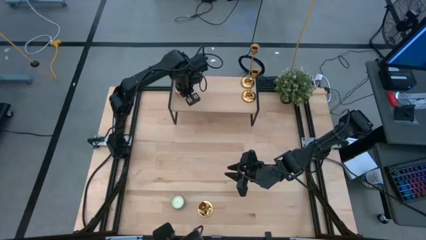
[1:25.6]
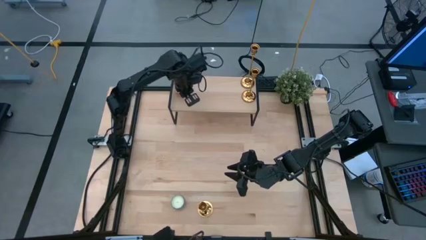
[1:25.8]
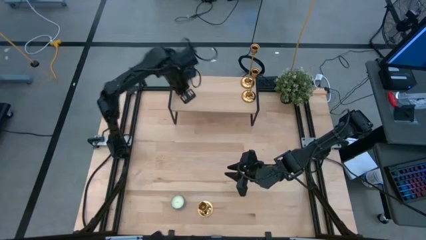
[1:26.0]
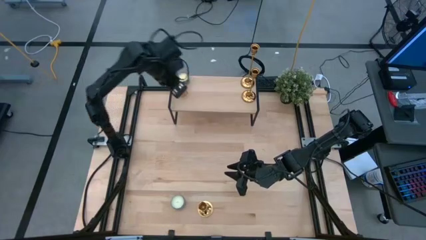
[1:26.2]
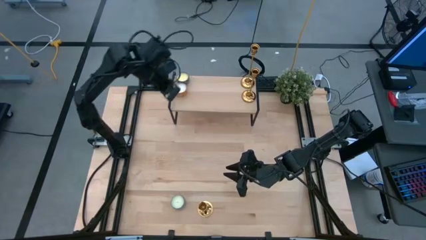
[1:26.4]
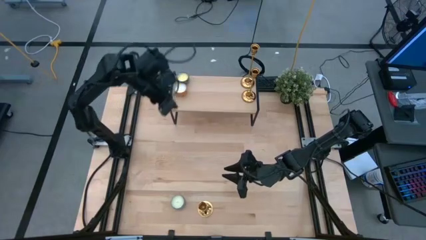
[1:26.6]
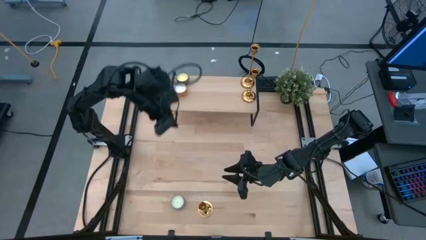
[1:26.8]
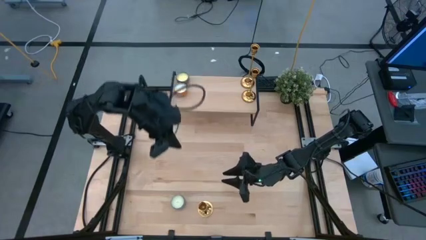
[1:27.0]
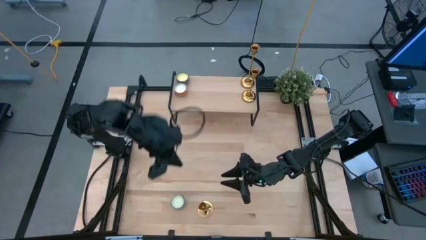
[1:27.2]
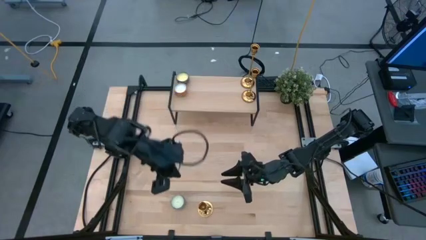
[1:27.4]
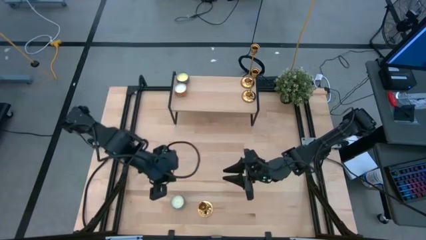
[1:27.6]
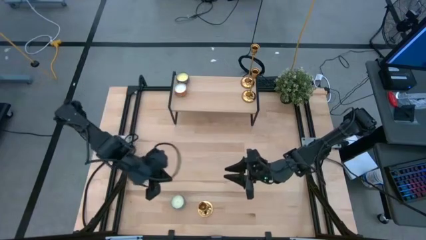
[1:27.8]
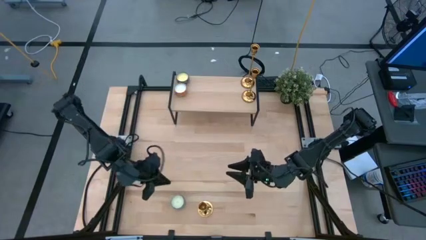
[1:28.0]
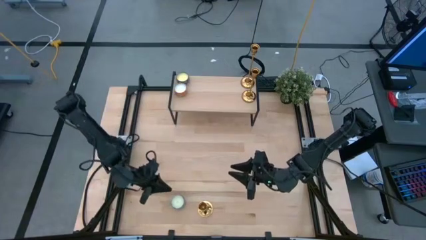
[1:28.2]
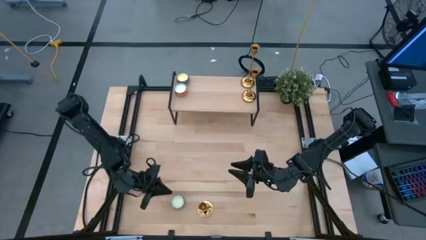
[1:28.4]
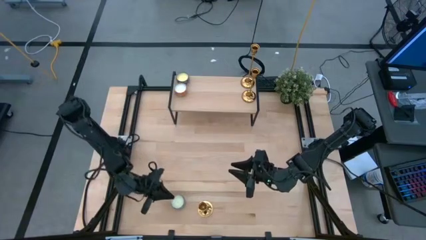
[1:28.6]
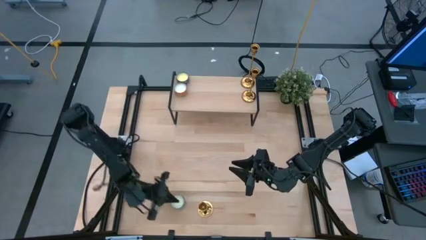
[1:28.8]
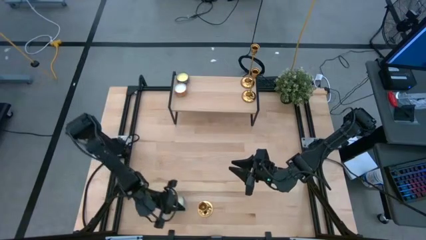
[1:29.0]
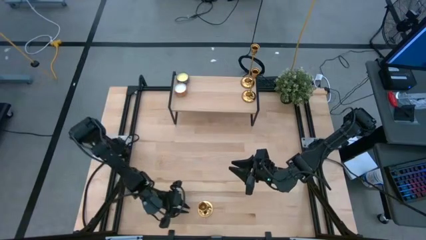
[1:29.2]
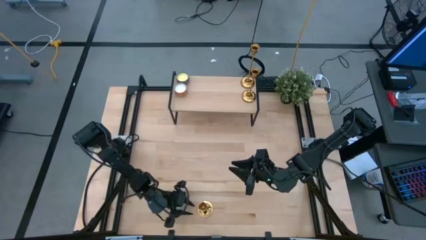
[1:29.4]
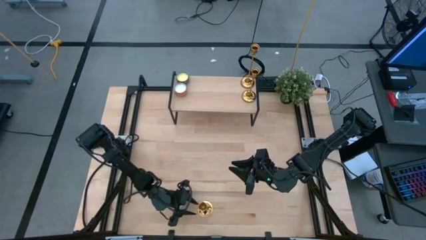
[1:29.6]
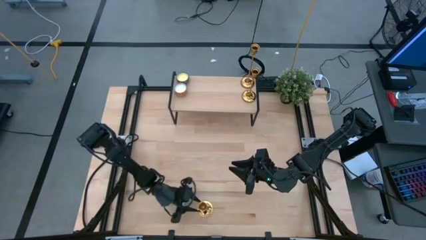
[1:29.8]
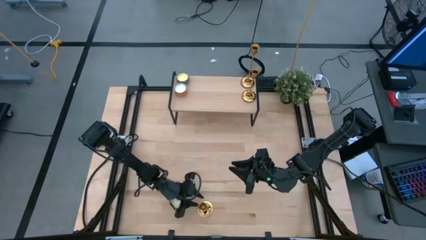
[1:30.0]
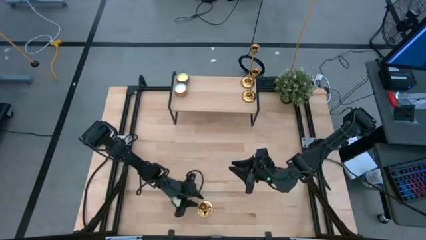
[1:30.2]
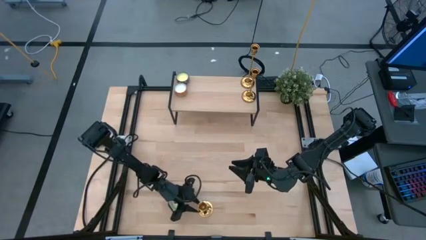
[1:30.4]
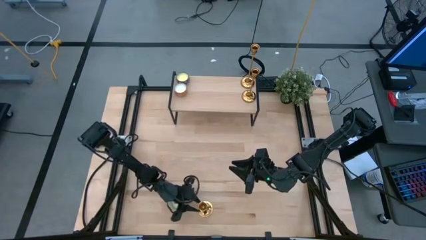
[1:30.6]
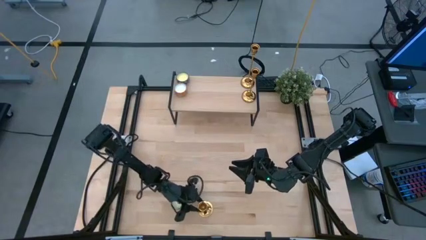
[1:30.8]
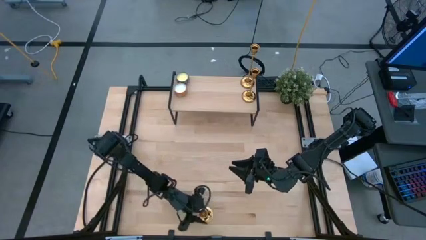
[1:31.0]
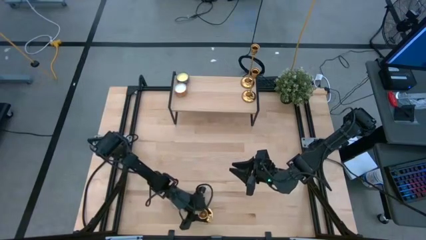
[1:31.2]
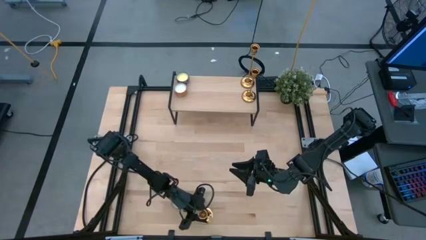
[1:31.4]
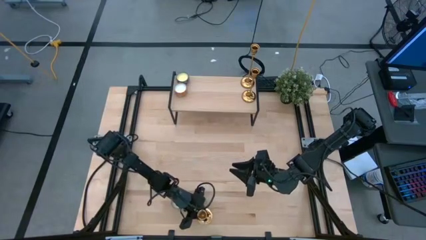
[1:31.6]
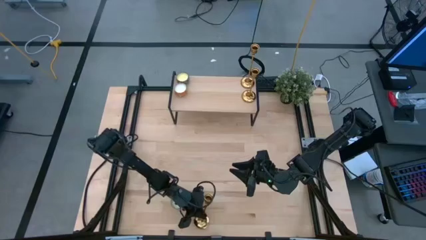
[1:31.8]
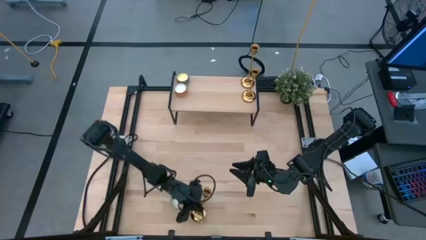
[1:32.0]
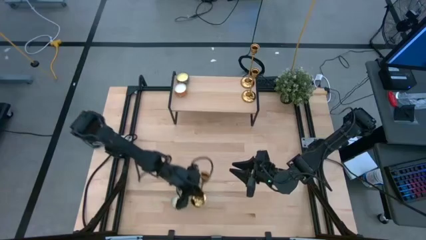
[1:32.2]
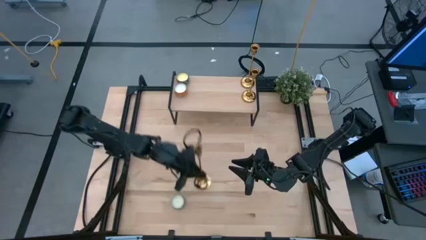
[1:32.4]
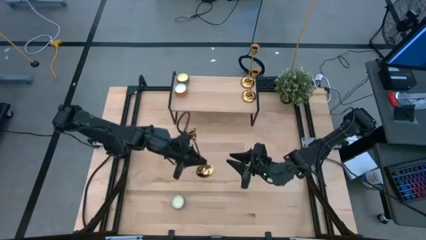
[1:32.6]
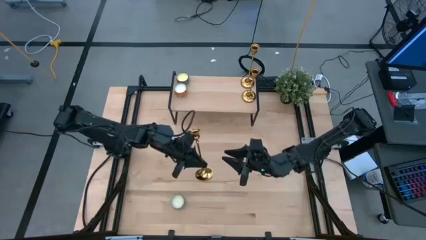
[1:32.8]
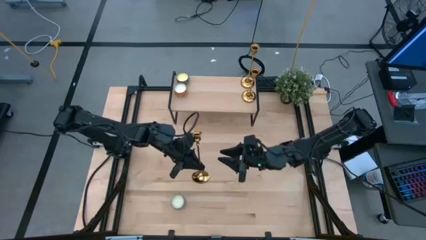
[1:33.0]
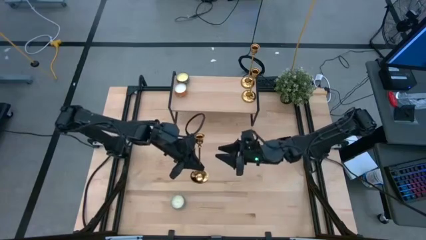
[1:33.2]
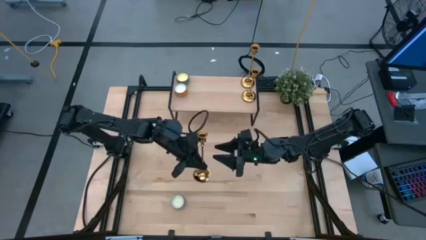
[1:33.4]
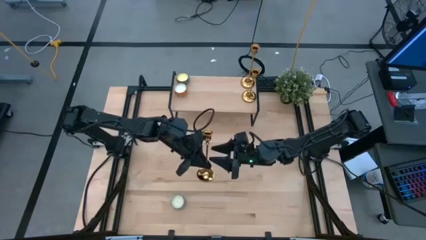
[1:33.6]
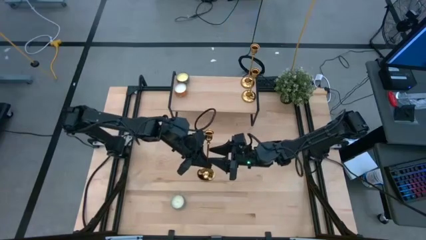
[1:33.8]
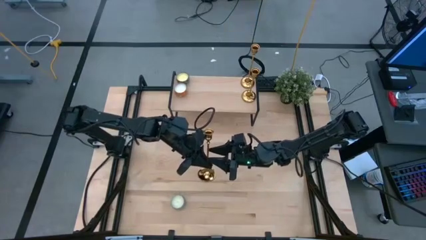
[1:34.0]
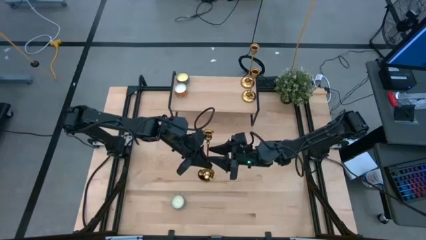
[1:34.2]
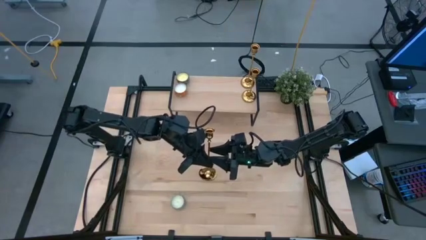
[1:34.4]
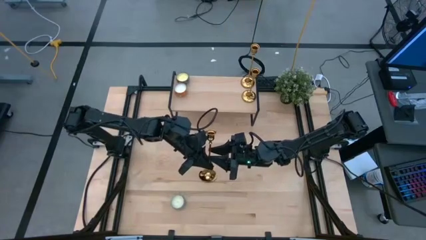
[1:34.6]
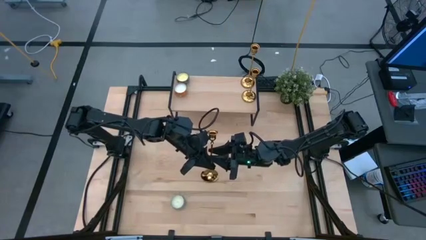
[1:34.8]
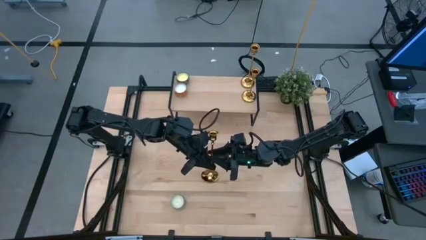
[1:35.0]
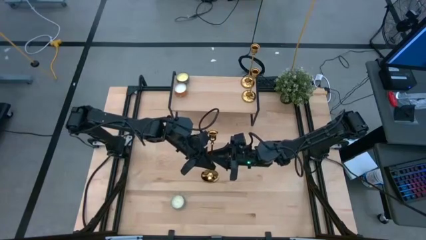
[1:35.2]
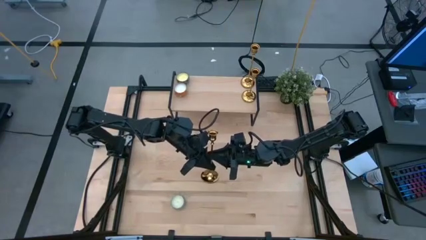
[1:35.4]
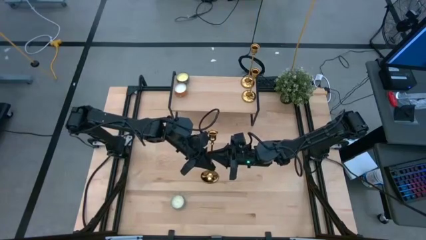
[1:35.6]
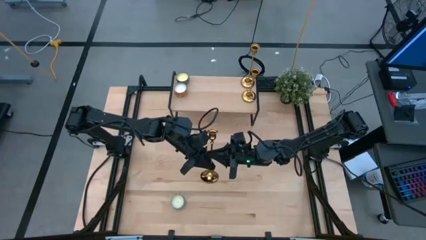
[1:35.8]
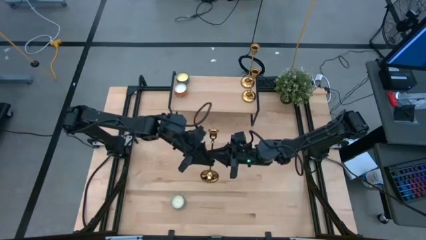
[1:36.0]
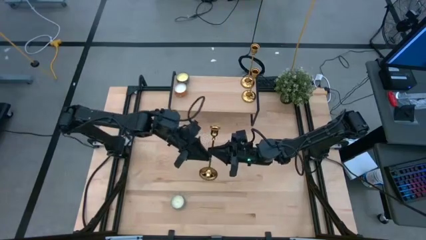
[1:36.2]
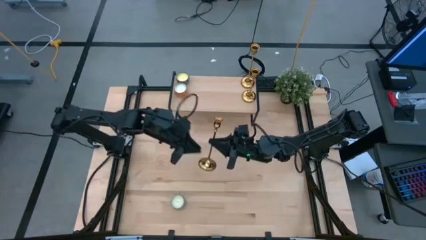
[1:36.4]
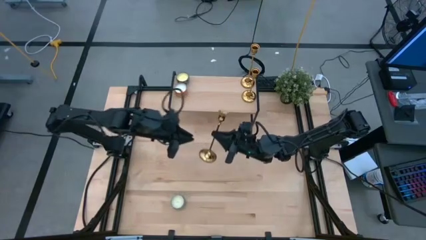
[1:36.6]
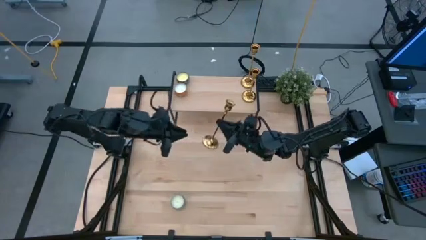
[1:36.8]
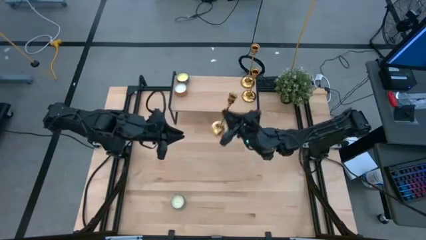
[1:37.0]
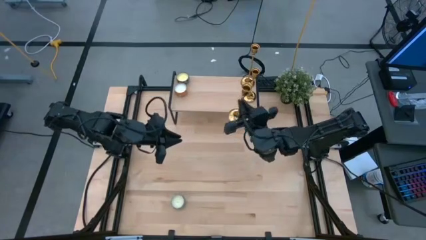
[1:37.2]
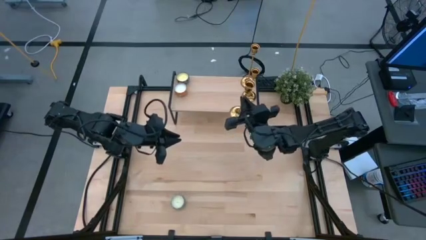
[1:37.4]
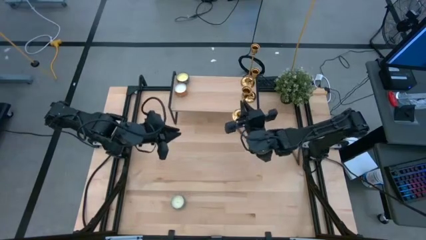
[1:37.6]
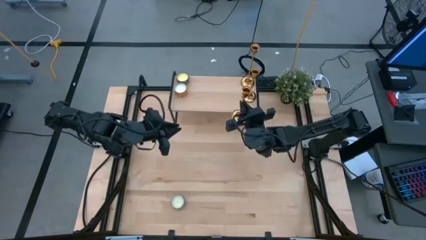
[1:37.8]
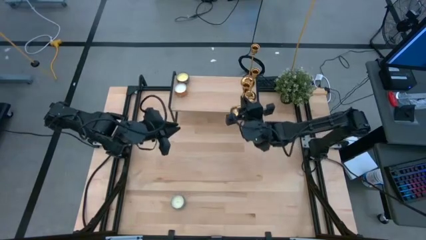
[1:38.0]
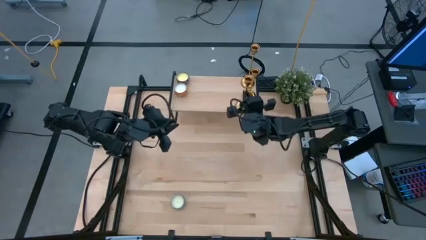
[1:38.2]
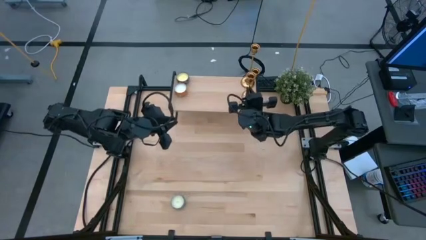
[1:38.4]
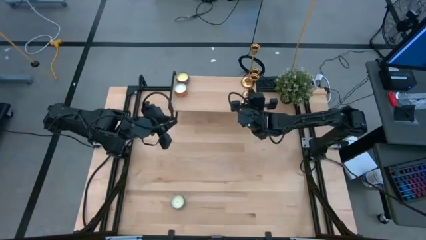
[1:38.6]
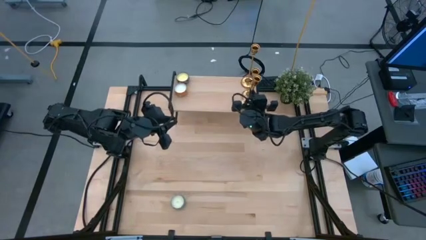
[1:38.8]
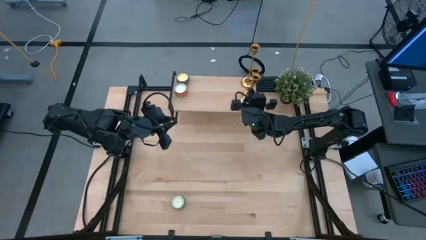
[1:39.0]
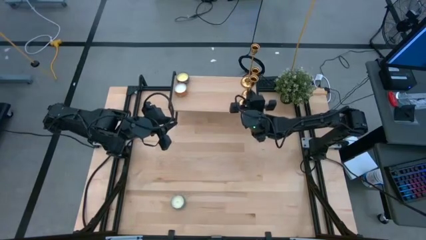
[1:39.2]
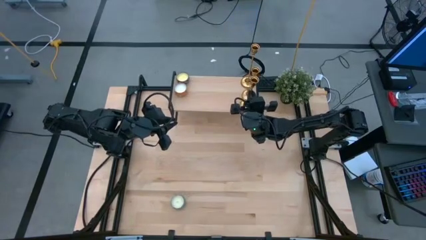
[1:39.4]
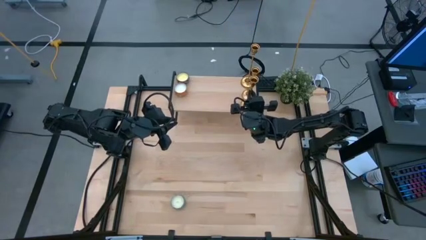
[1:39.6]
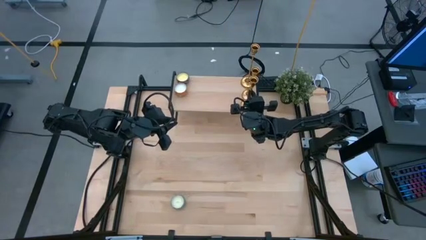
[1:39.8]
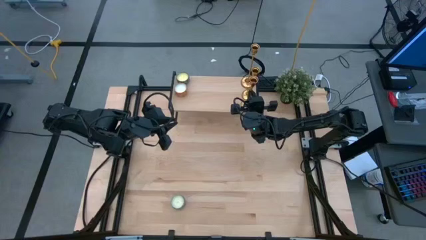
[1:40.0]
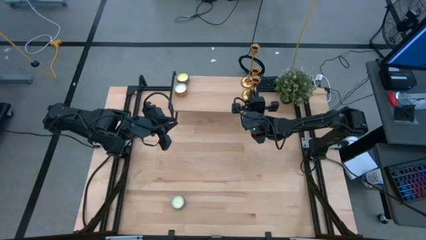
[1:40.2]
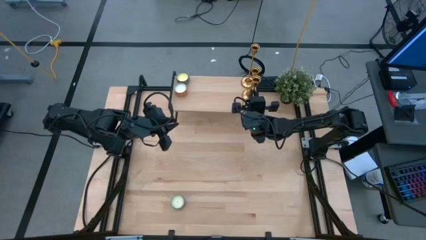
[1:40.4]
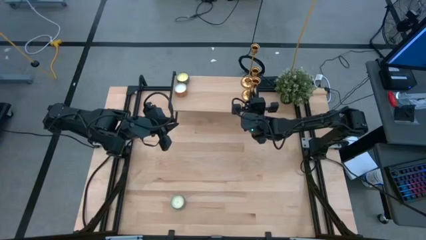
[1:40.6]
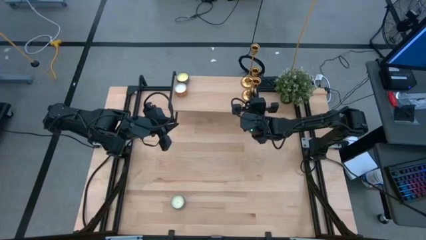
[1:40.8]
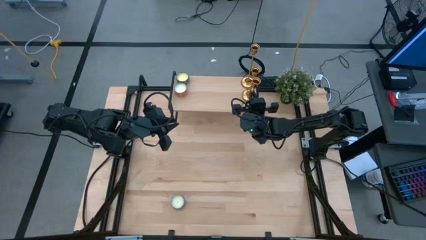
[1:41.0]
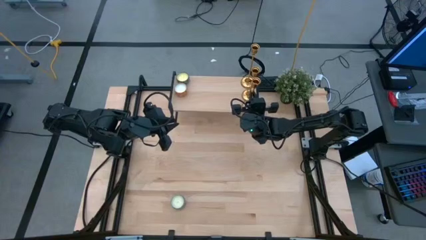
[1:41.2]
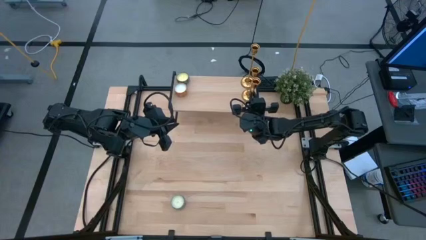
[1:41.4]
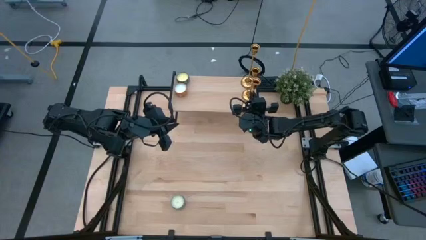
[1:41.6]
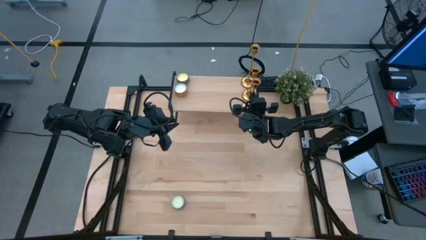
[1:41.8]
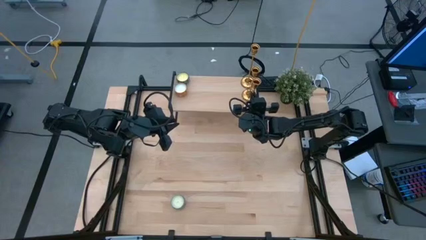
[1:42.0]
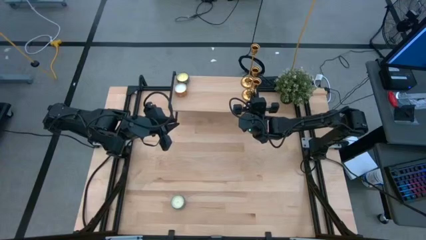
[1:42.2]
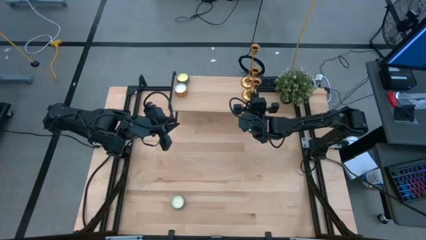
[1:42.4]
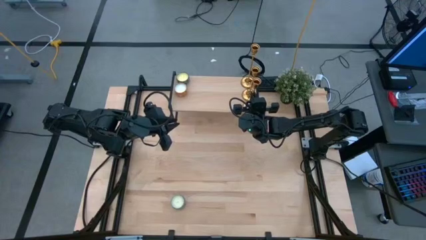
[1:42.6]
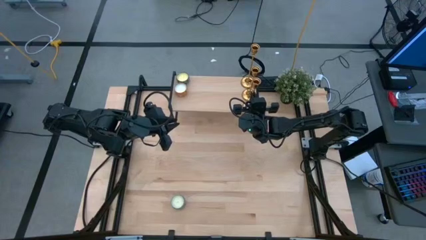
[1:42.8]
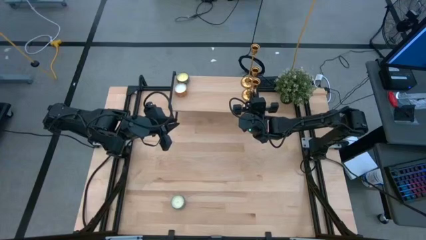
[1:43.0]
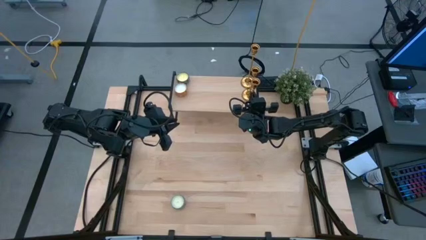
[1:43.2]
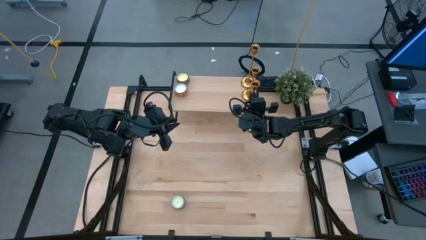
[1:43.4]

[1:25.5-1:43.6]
Task: Pick & Place candle stick holders
Put the gold candle holder on the shelf aligned with the other gold candle holder
